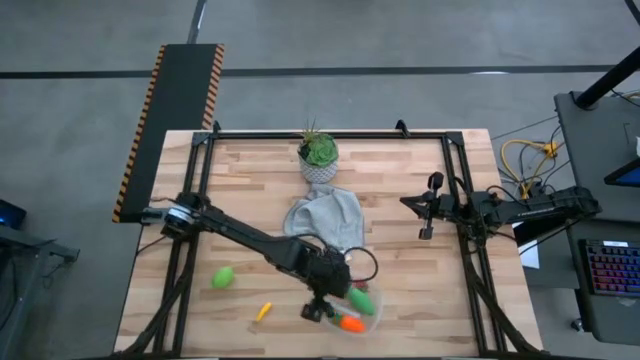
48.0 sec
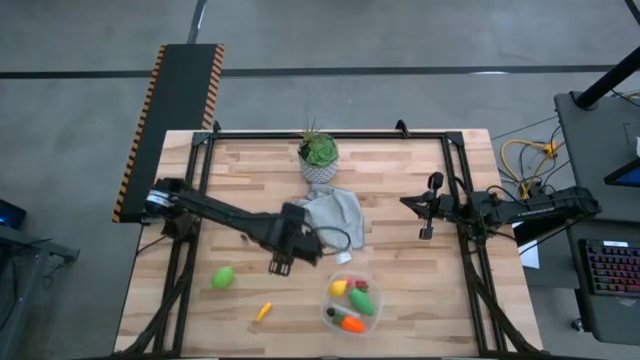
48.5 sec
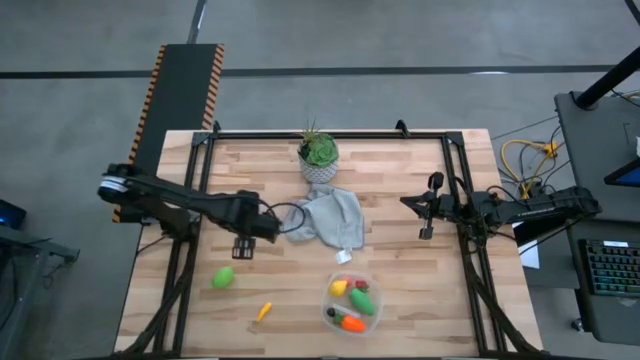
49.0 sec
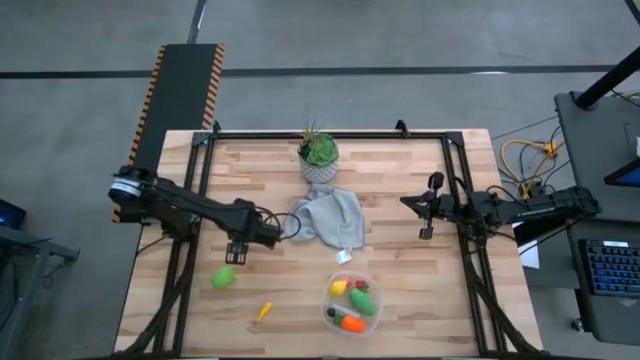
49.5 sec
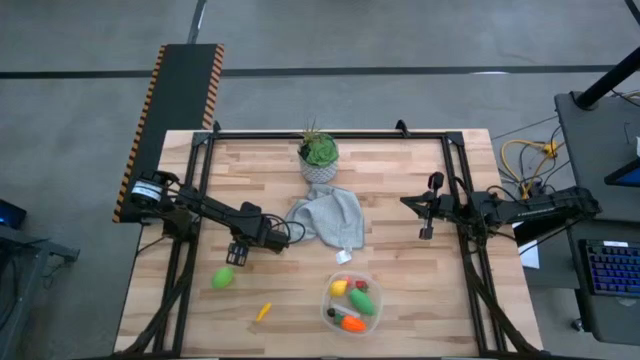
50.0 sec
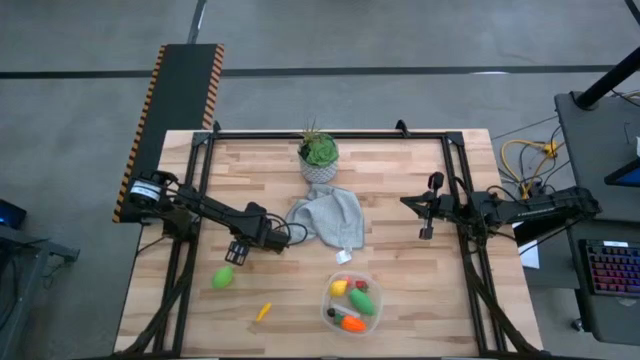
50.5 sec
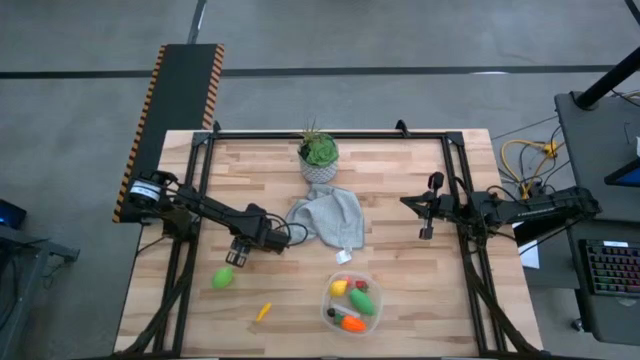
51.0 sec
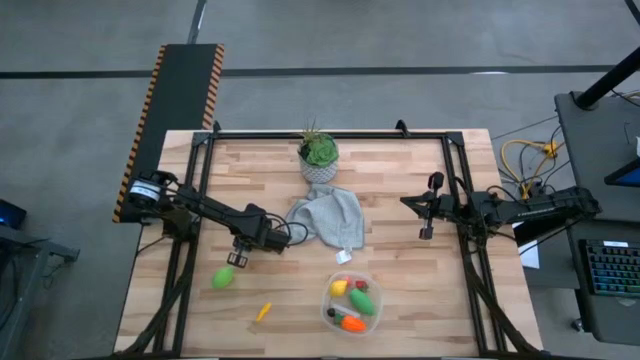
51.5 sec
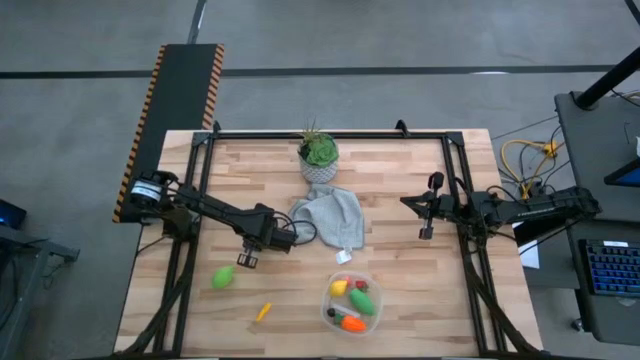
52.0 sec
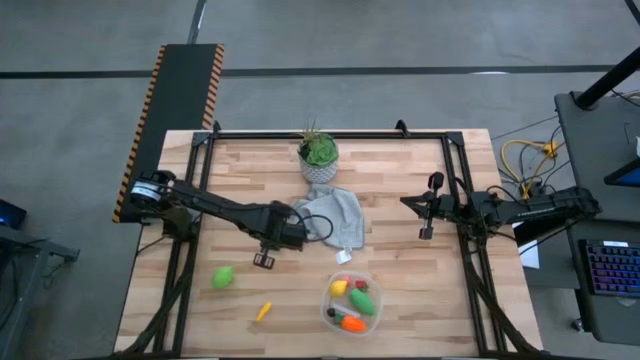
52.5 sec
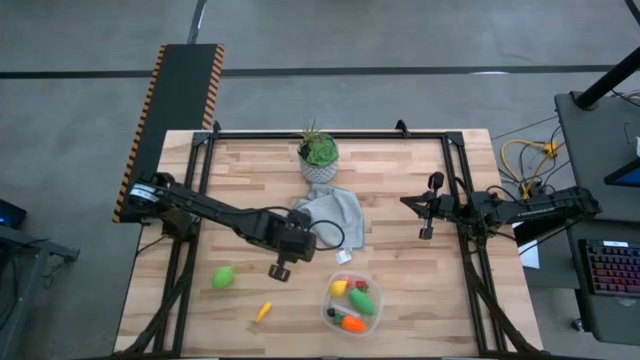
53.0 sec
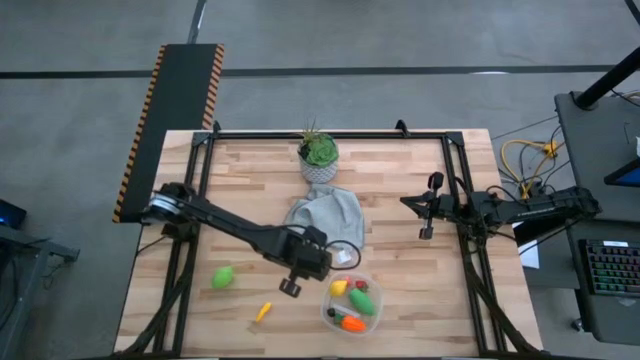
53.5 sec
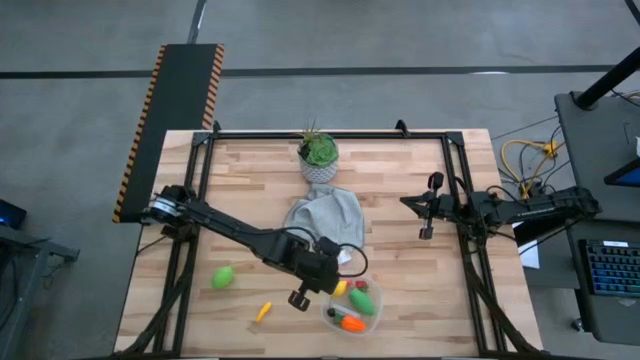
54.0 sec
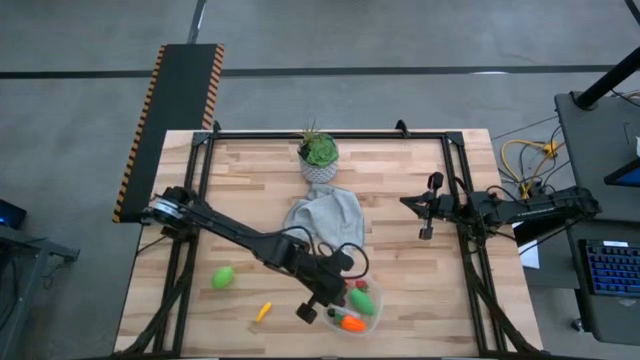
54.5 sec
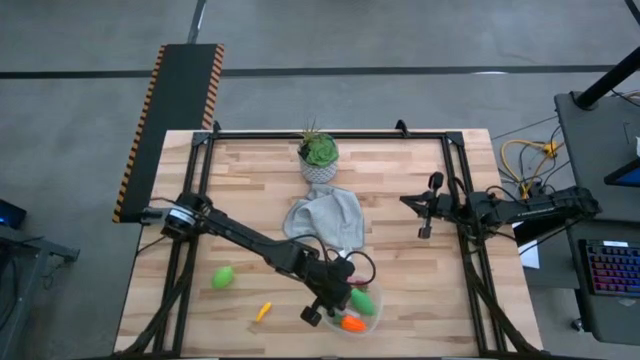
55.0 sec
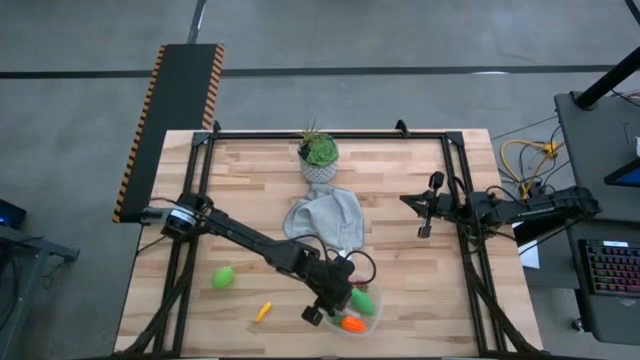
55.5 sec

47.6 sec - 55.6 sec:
Task: Pick and placing Produce into tupperware
Put the red cherry into the transparent bin

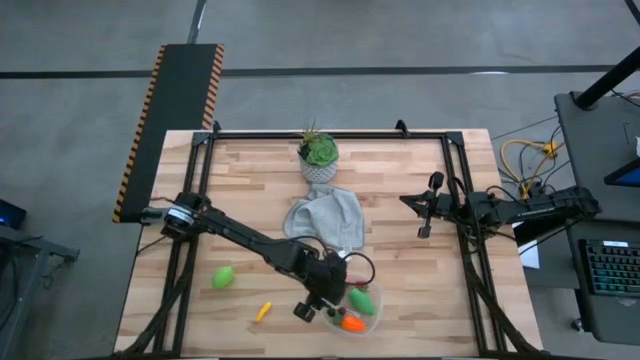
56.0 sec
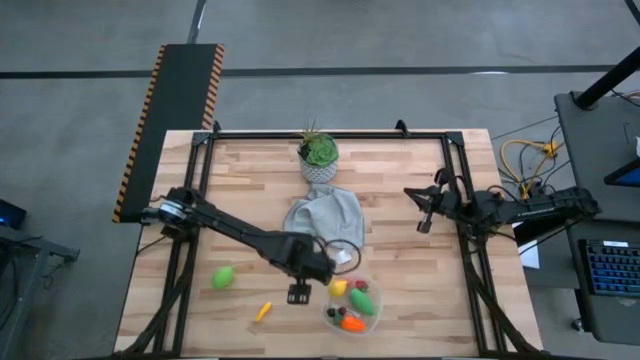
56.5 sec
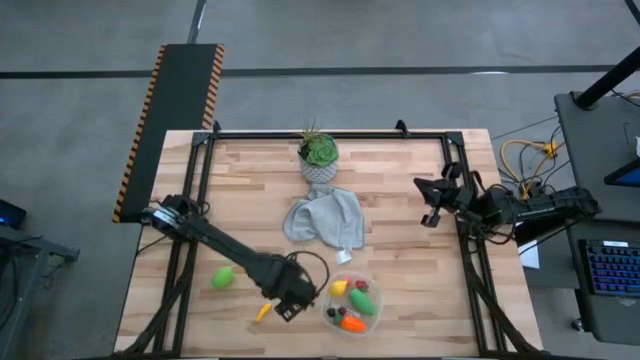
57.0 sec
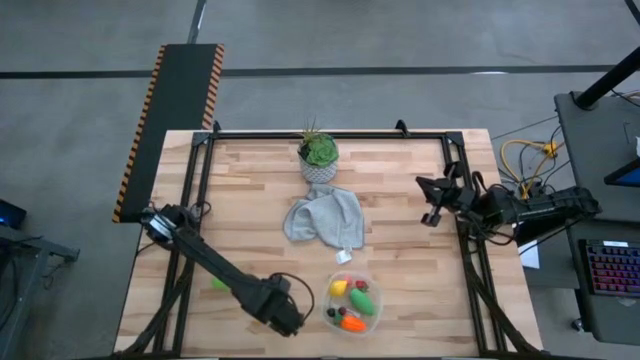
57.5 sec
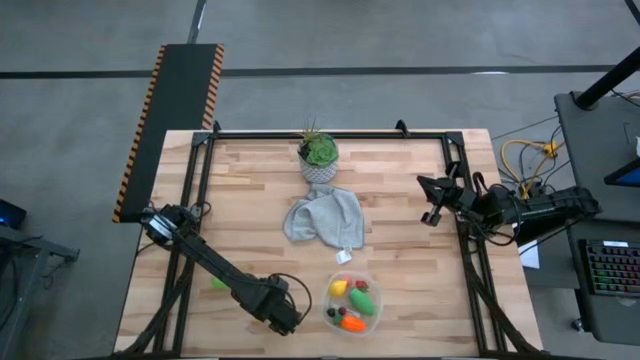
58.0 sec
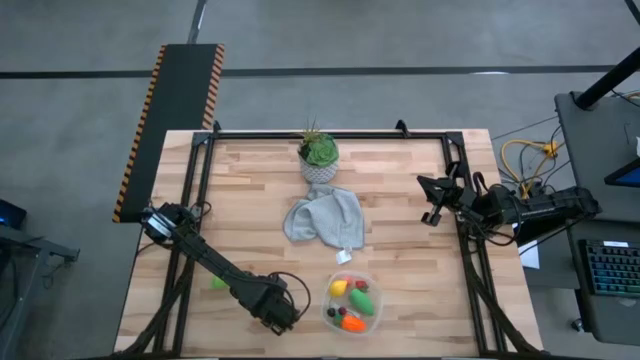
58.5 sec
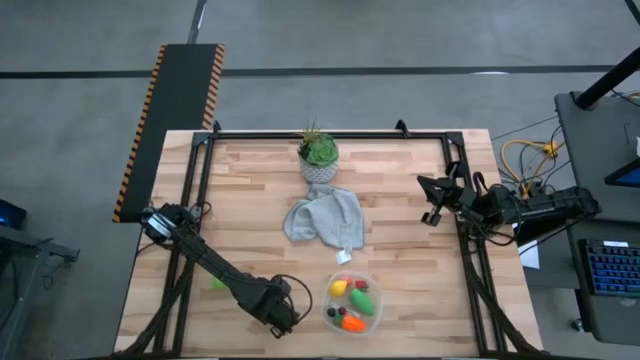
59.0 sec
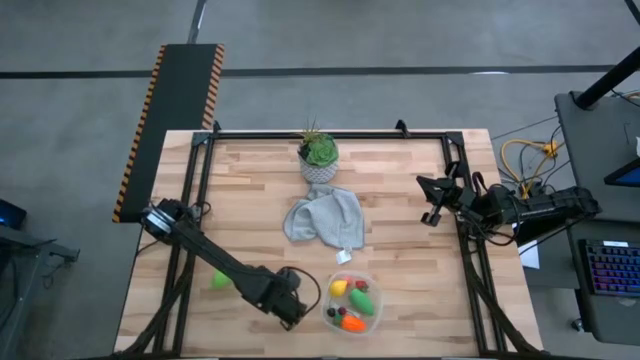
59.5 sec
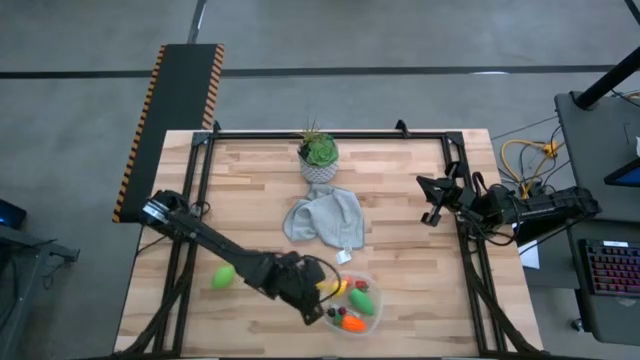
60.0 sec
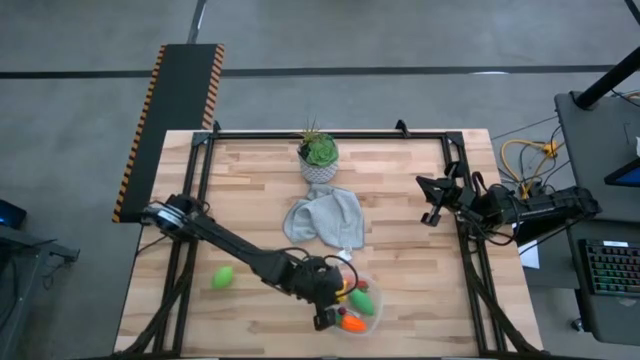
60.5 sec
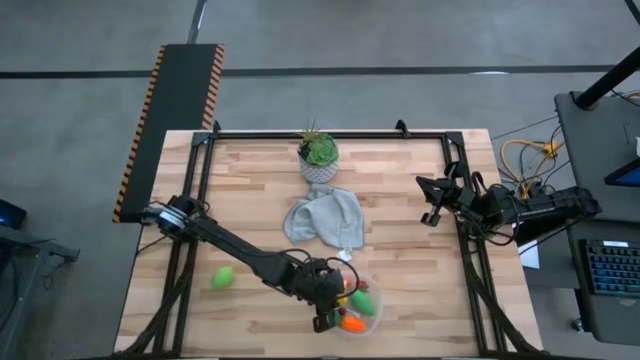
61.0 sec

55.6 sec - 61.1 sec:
Put the yellow corn into the transparent bin

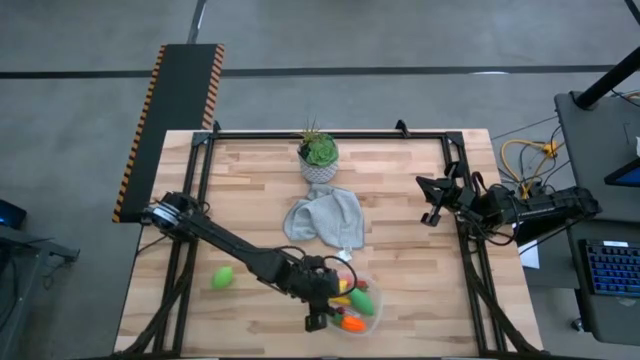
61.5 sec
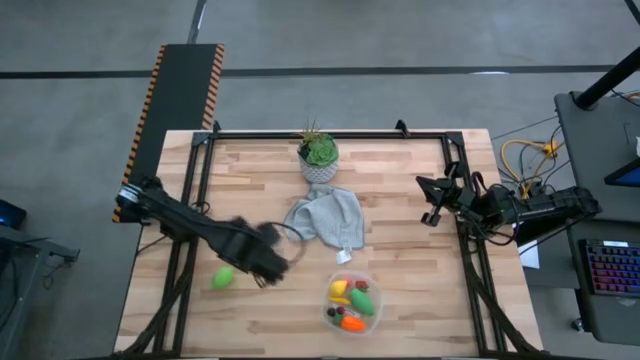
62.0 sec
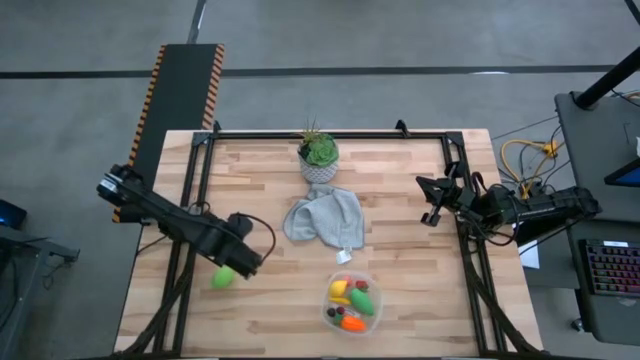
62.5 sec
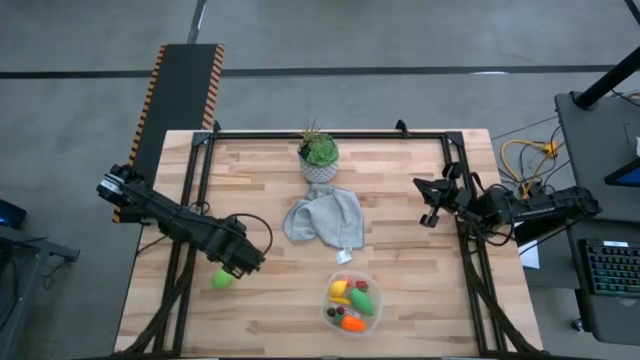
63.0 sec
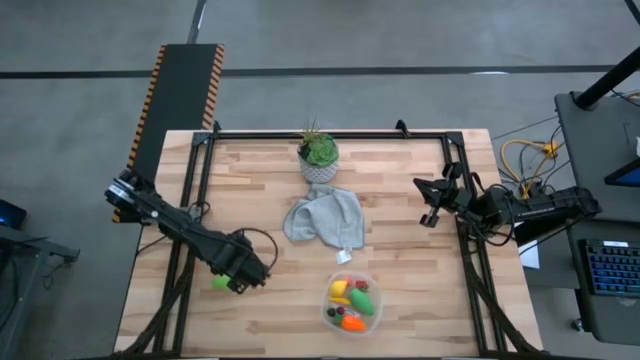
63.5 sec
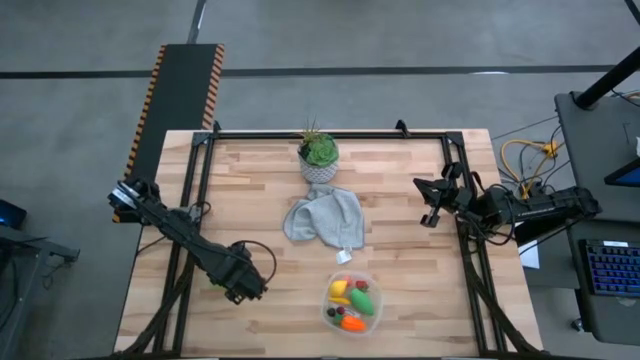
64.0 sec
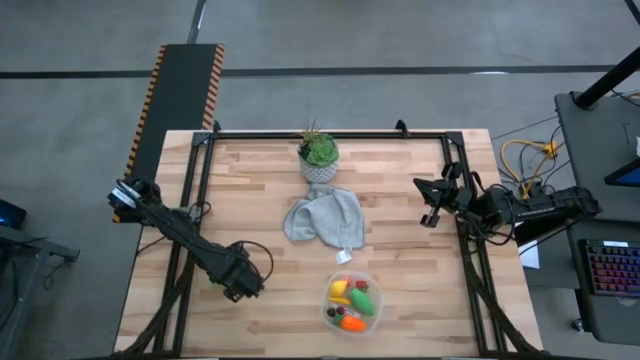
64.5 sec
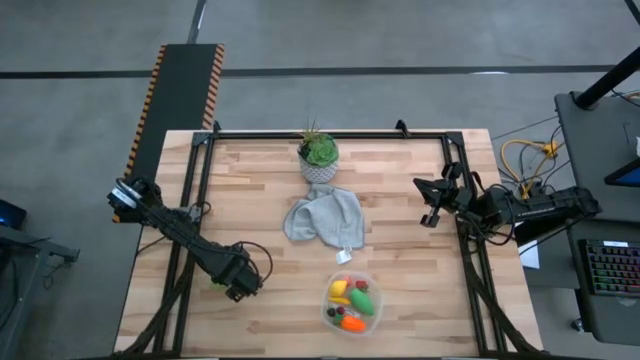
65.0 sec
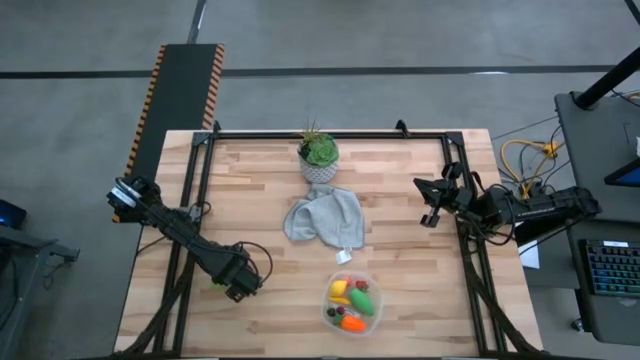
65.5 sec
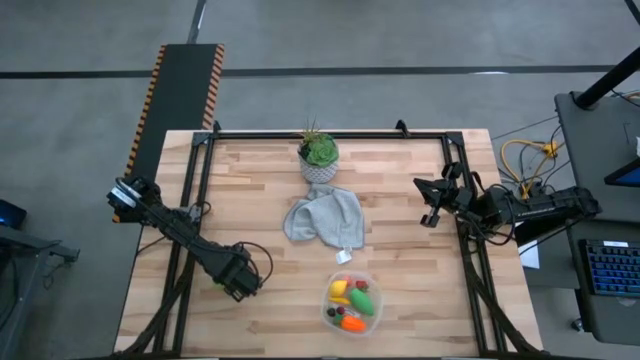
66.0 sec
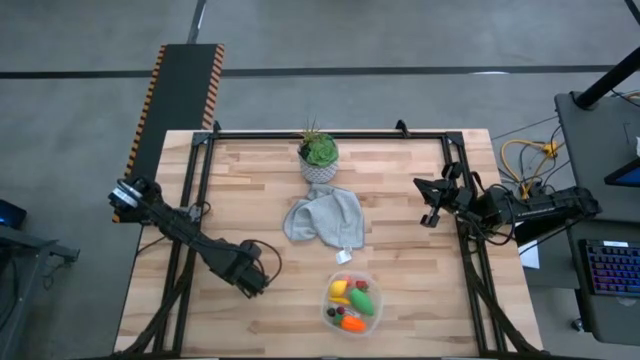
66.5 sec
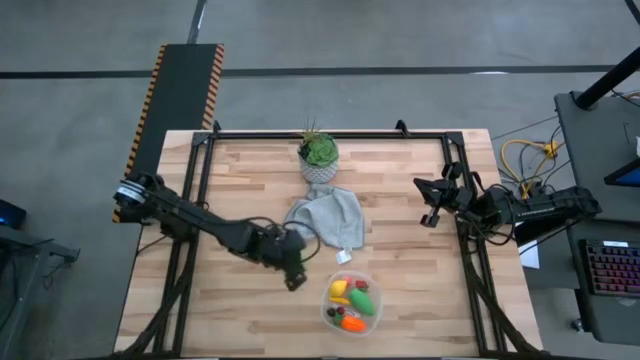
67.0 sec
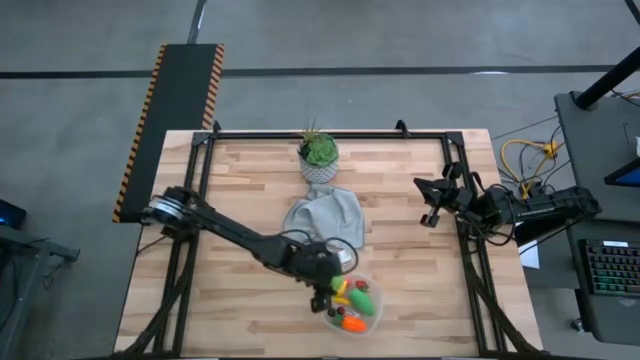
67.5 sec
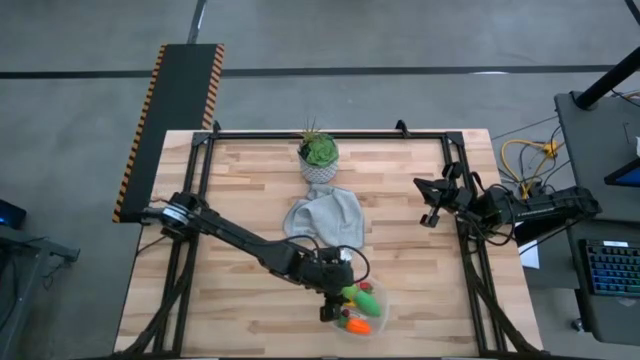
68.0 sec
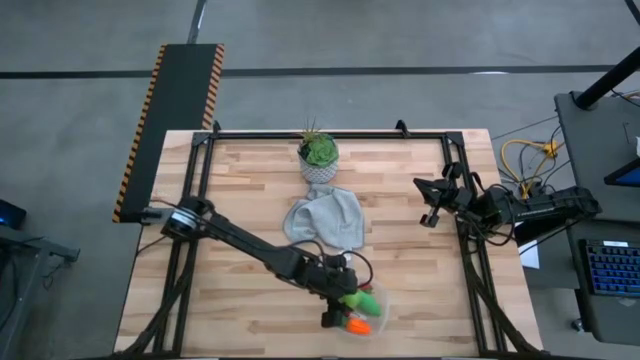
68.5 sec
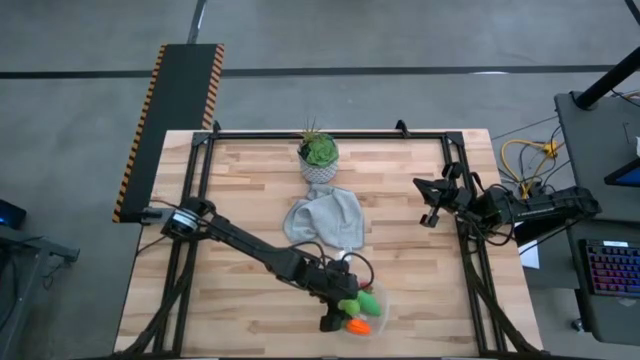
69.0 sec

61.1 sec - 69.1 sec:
Put the cabbage into the transparent bin
